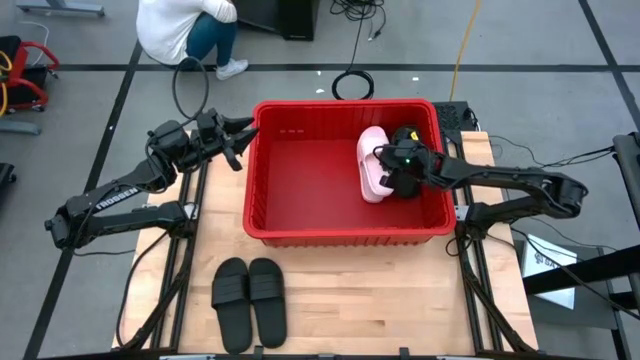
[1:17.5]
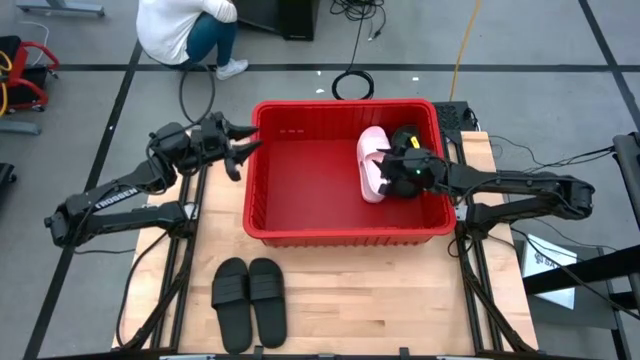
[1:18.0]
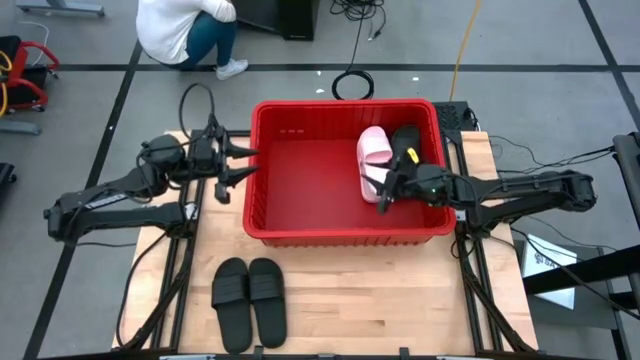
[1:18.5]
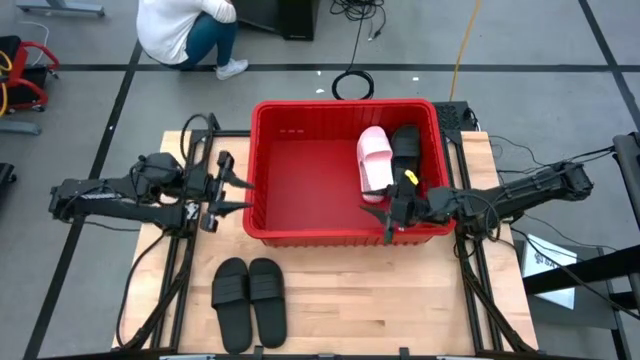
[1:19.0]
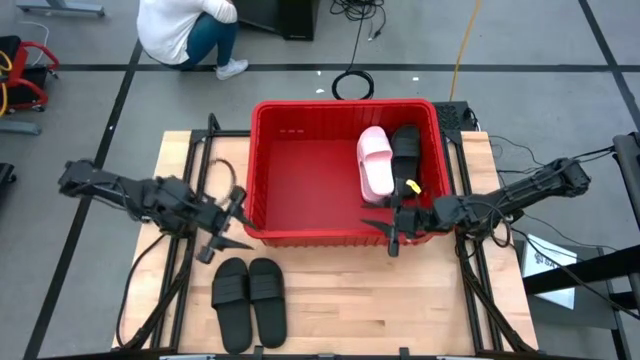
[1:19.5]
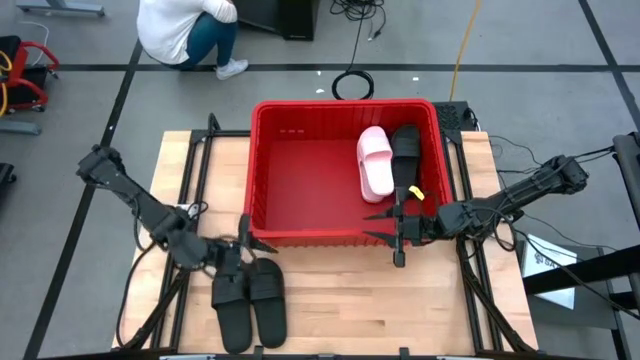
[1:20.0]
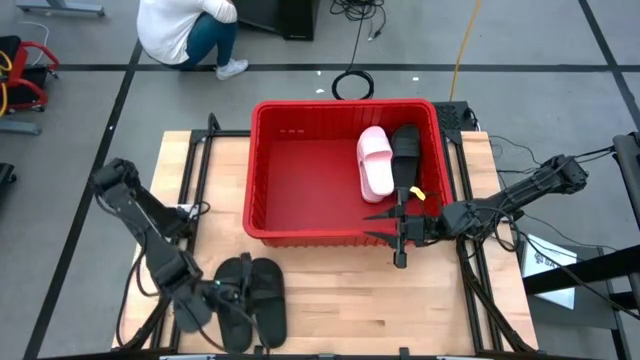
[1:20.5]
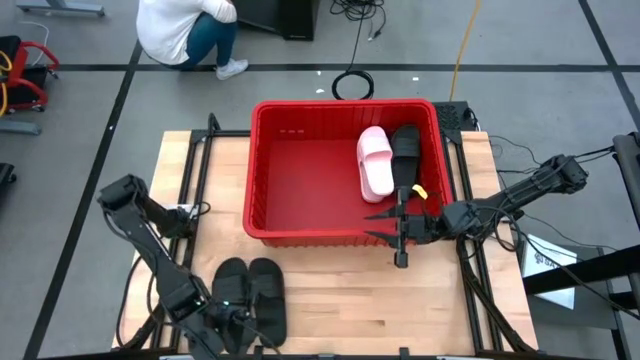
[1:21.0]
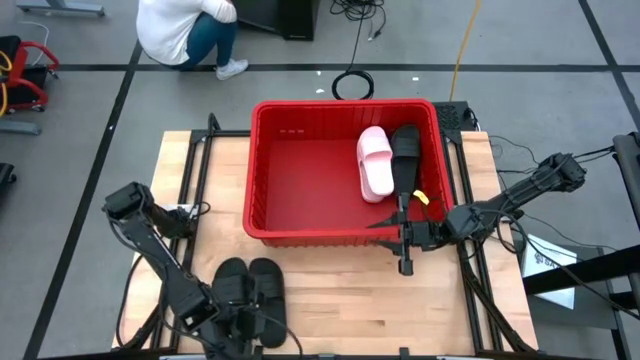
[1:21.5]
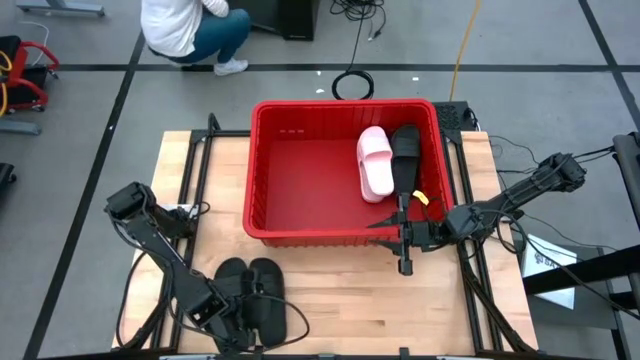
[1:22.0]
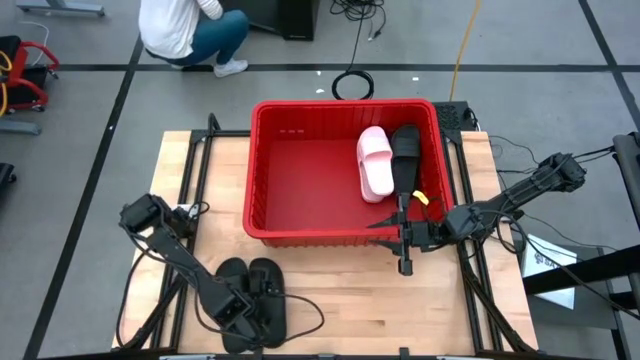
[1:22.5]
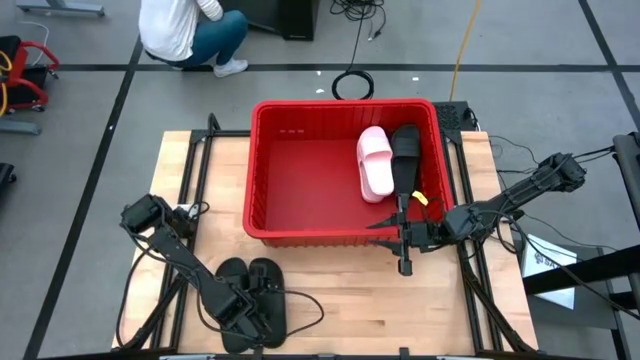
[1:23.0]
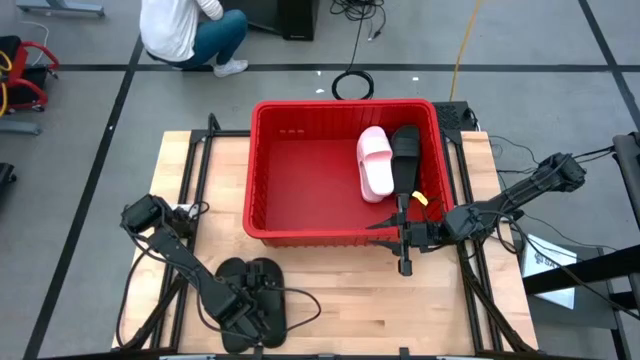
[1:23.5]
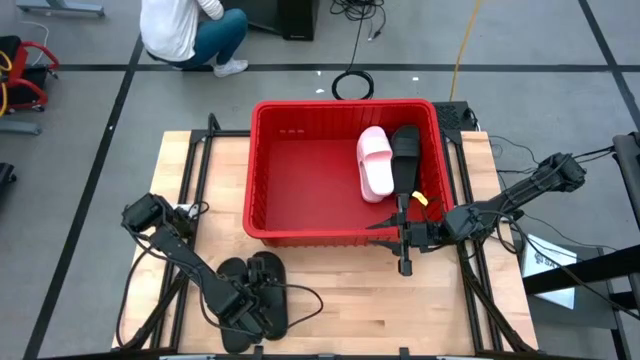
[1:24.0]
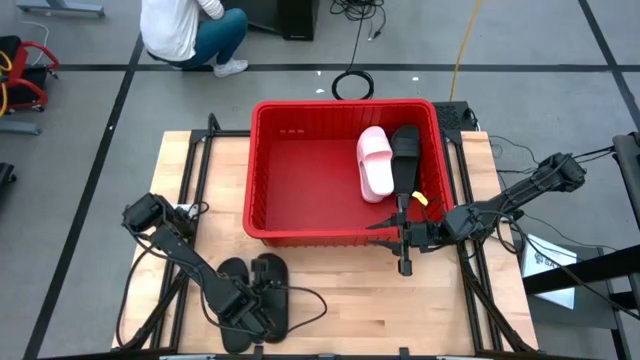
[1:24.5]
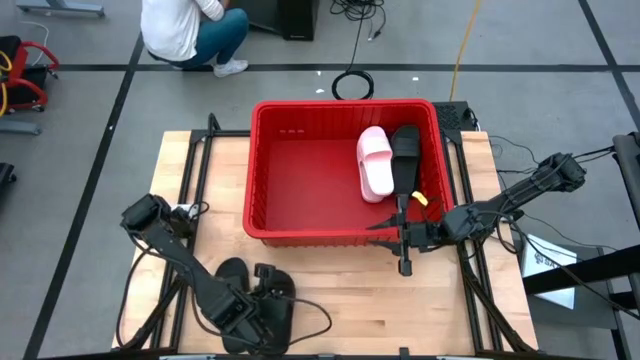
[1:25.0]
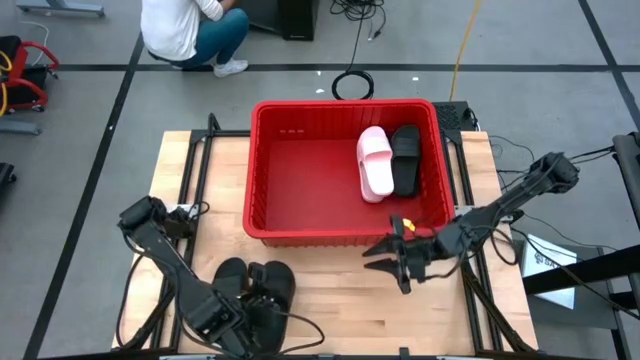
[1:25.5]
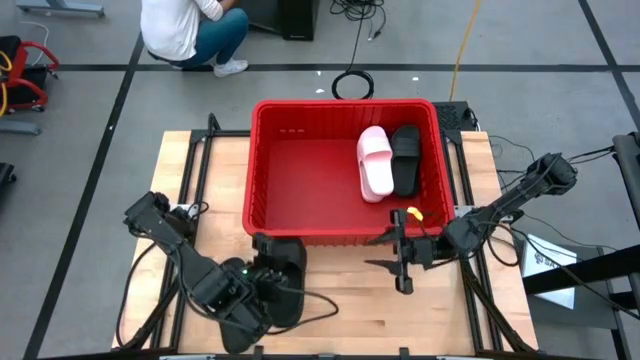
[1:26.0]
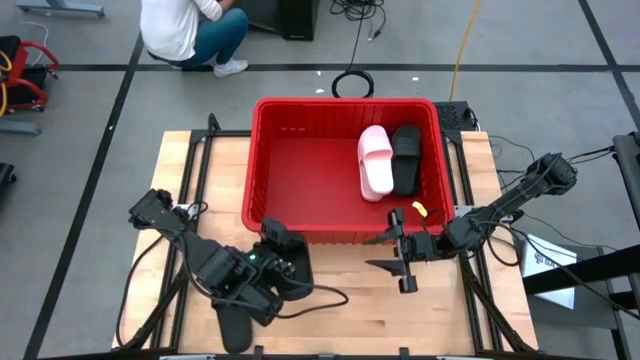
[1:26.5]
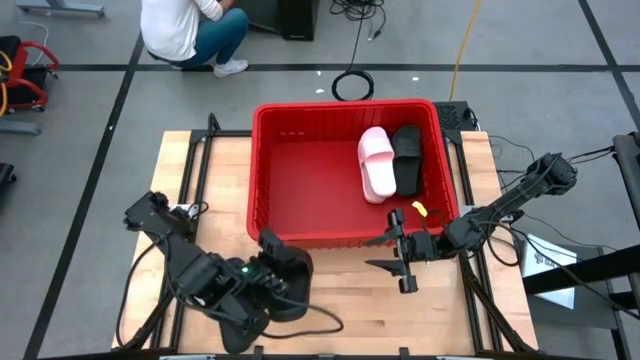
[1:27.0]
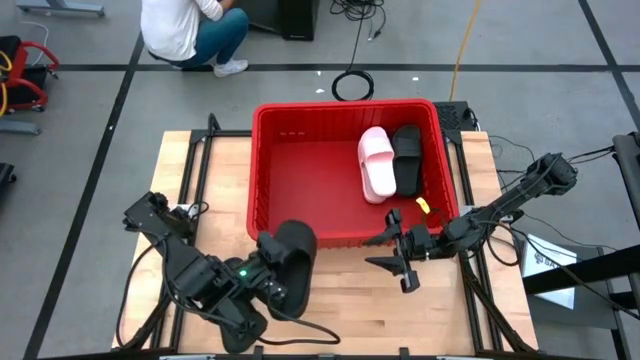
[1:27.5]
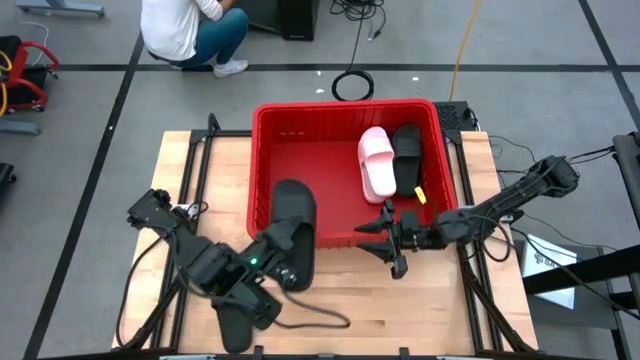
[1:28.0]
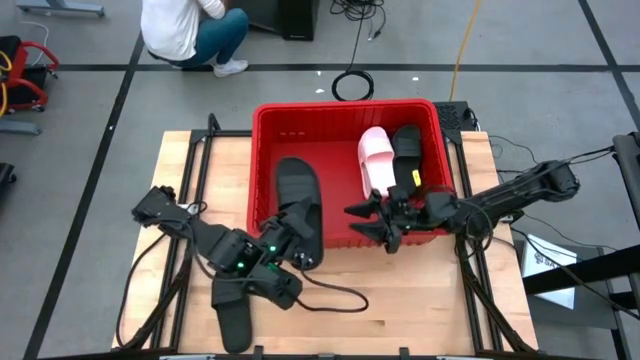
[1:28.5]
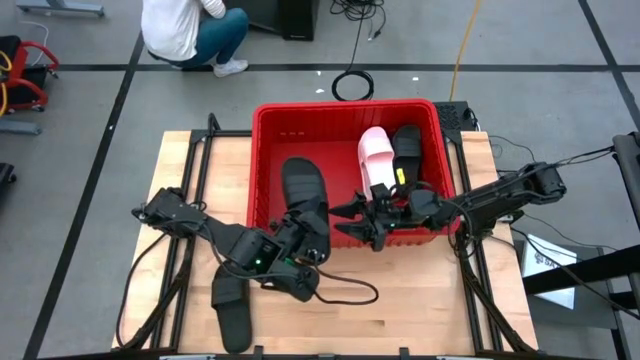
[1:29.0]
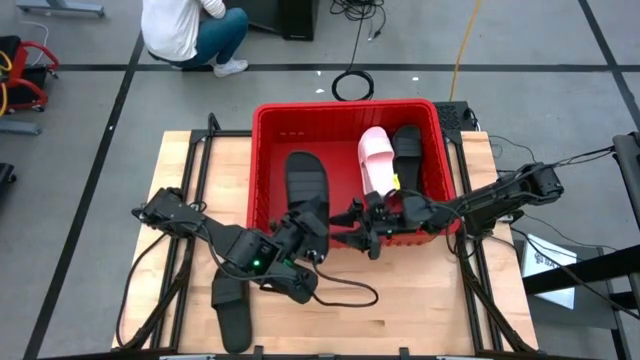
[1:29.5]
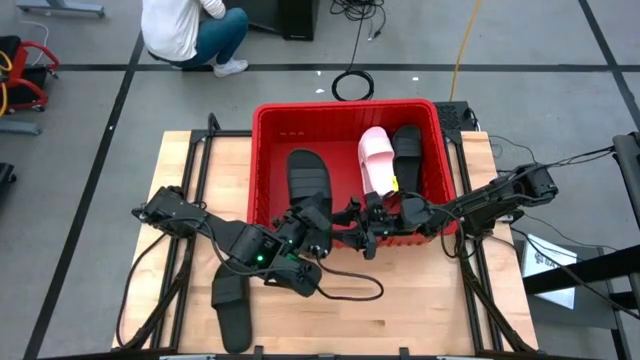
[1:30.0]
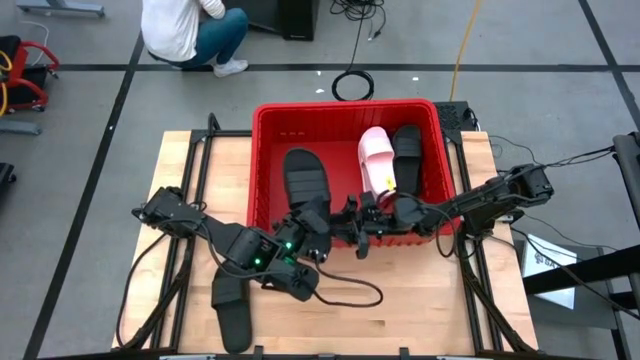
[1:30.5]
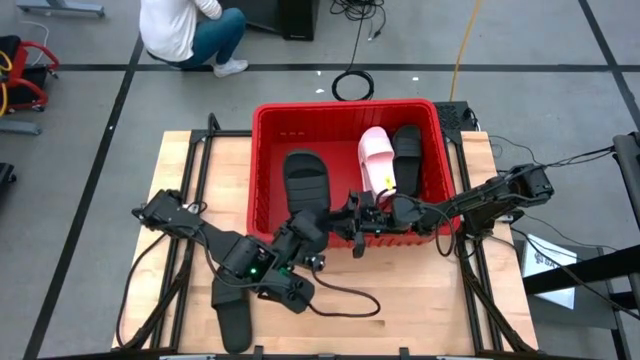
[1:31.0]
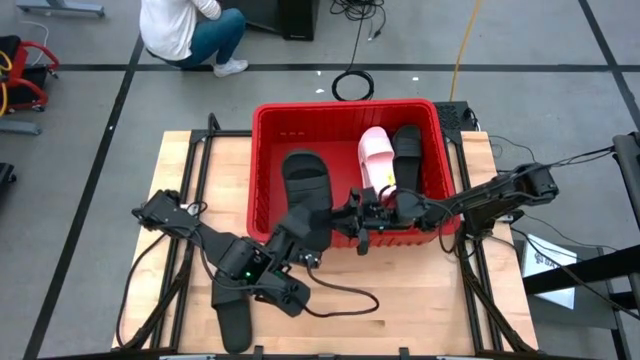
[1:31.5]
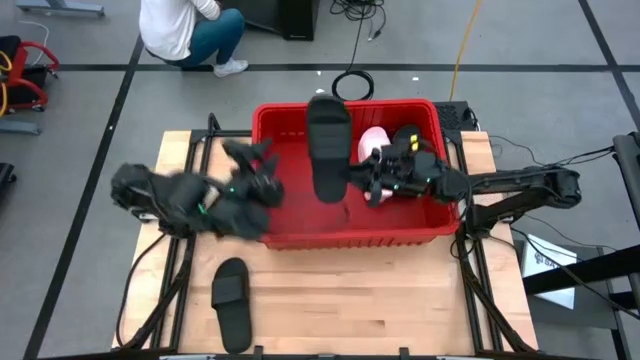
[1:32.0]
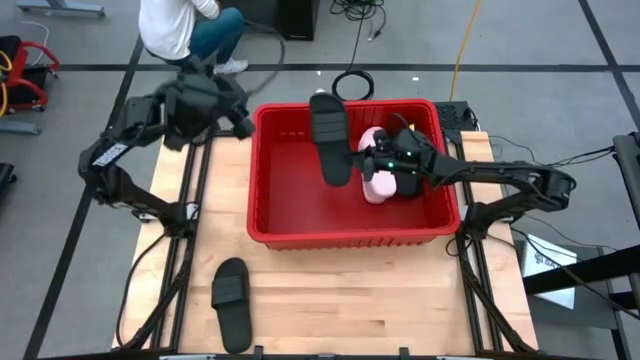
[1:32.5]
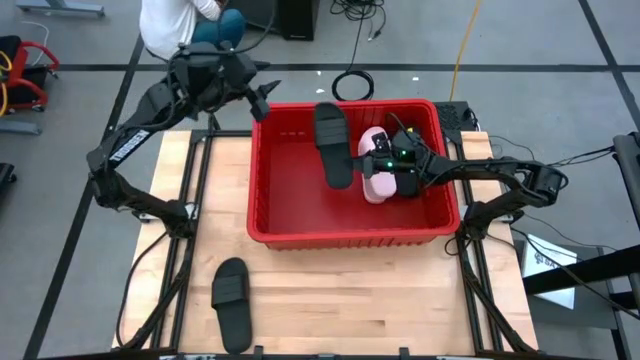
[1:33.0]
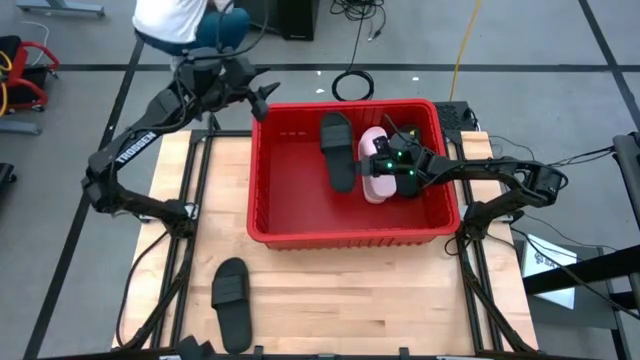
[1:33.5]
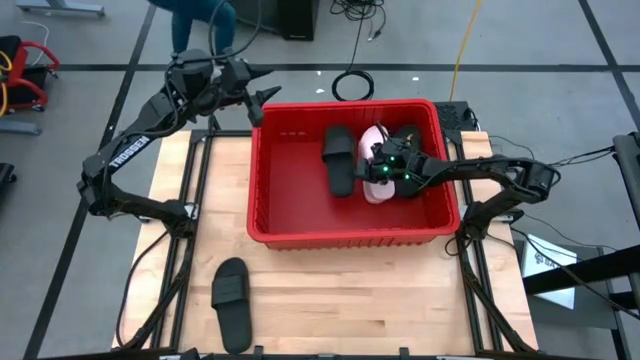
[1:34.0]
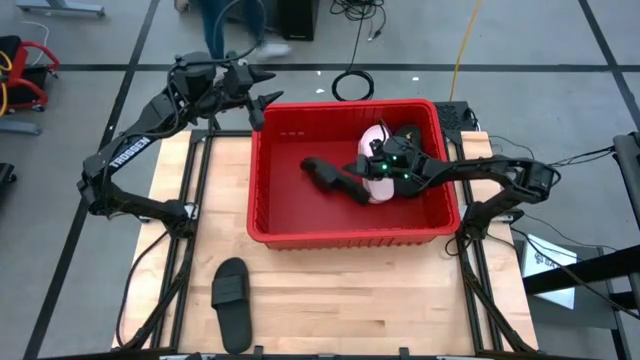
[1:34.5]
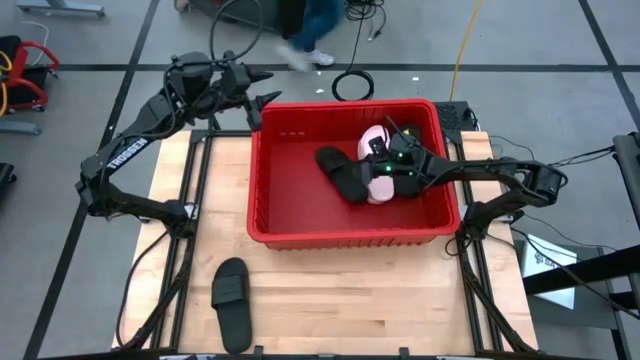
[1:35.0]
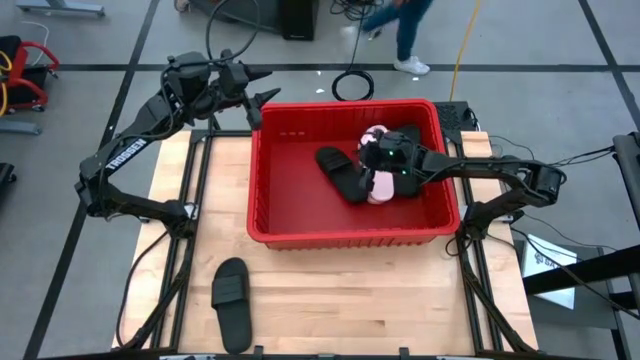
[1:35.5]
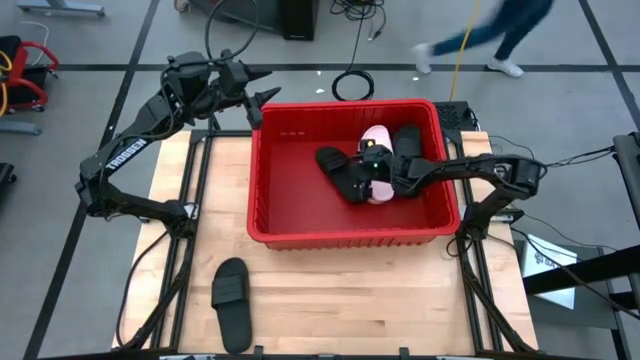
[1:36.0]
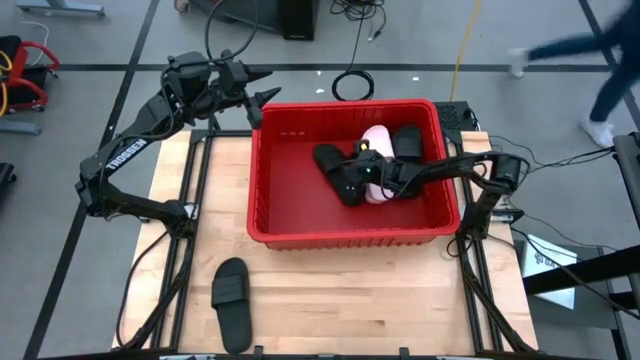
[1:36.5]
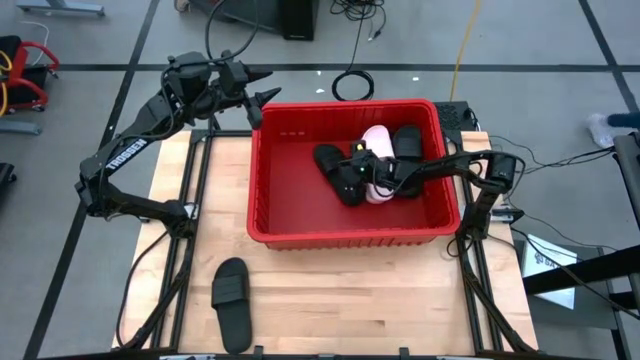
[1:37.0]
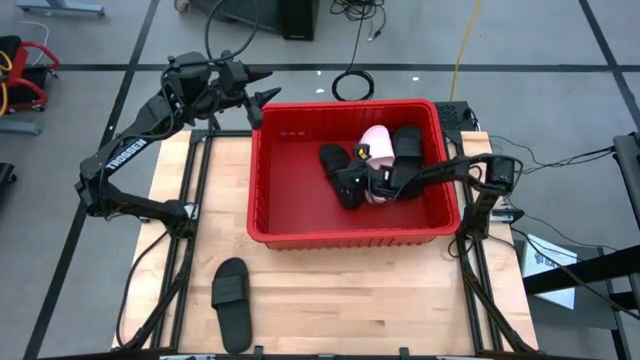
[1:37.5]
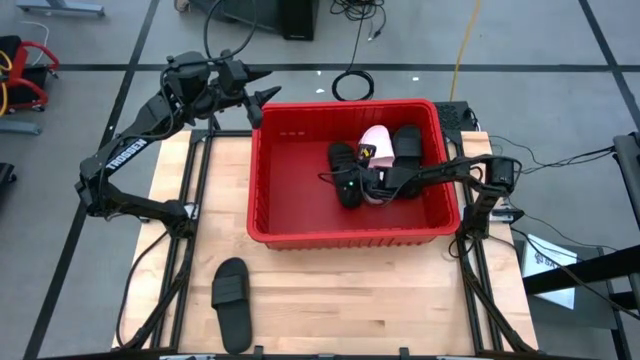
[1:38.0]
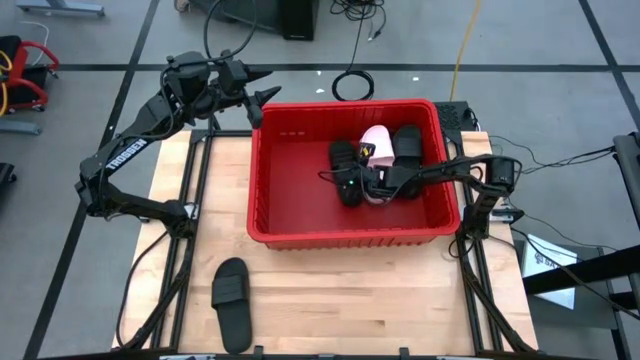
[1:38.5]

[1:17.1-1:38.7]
Task: Pick and place slides into bin
Put the right black slide into the bin
